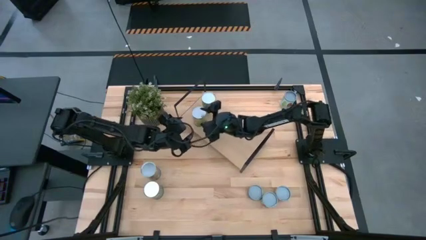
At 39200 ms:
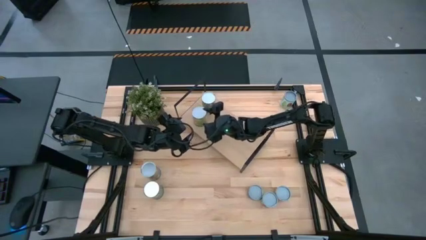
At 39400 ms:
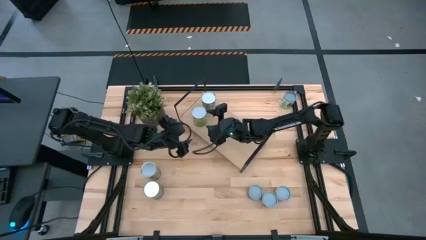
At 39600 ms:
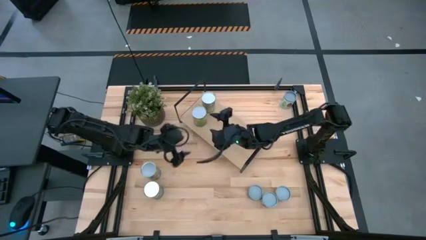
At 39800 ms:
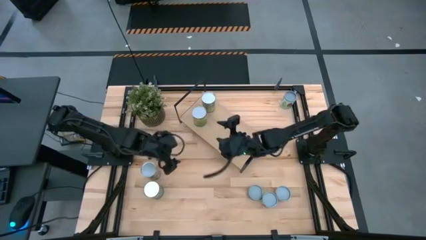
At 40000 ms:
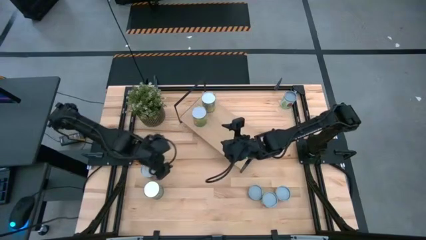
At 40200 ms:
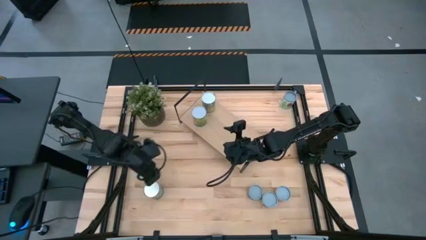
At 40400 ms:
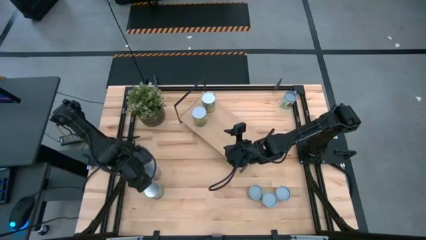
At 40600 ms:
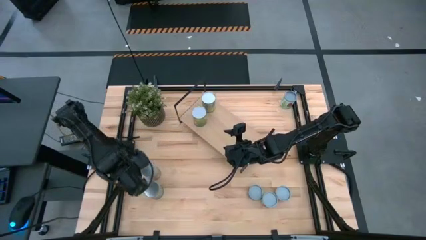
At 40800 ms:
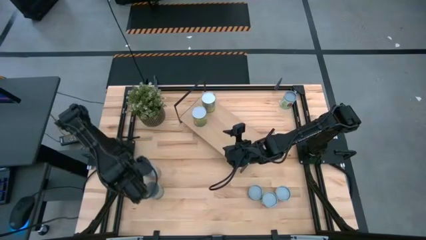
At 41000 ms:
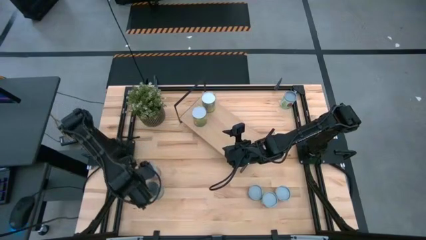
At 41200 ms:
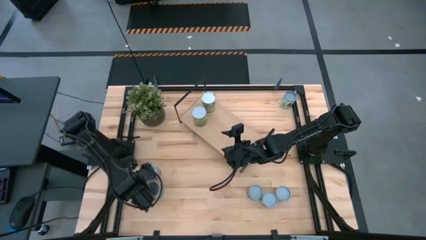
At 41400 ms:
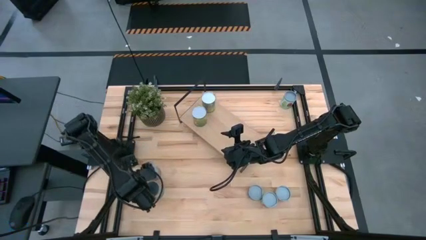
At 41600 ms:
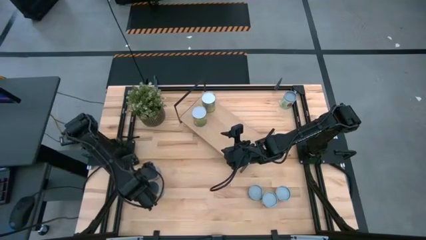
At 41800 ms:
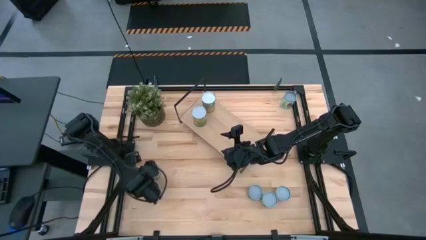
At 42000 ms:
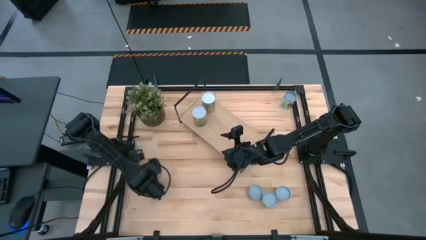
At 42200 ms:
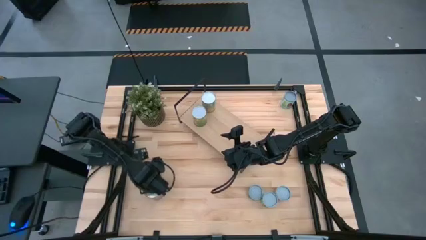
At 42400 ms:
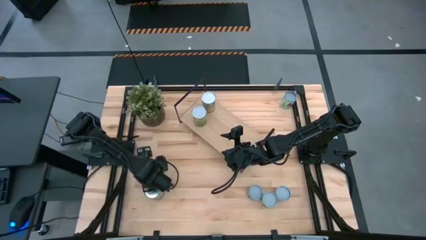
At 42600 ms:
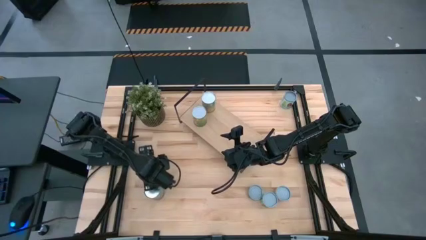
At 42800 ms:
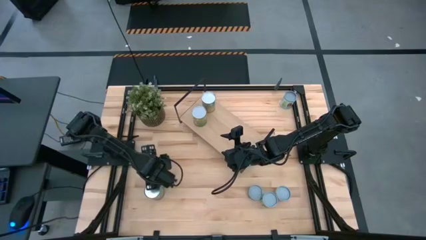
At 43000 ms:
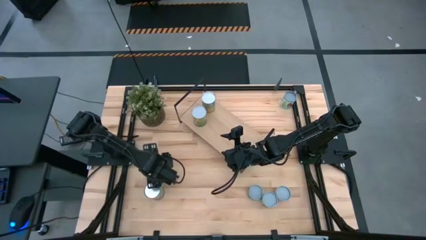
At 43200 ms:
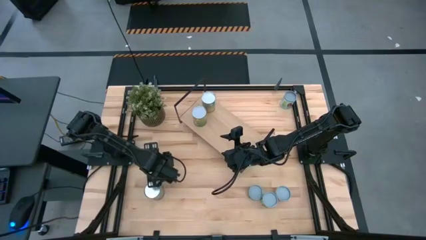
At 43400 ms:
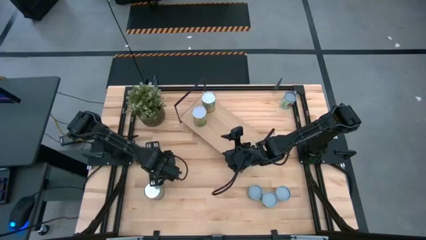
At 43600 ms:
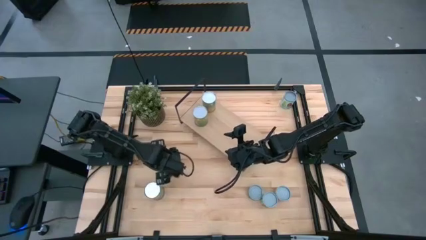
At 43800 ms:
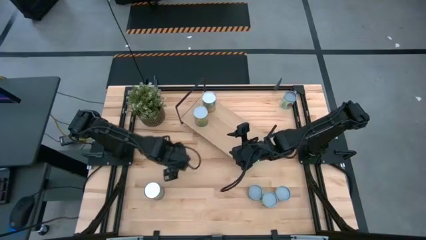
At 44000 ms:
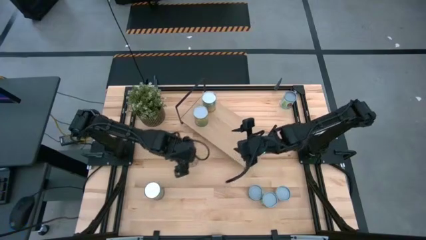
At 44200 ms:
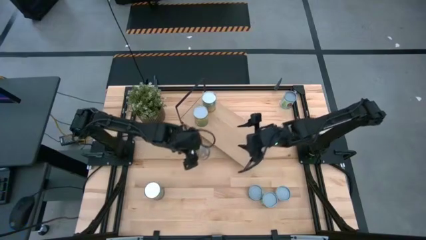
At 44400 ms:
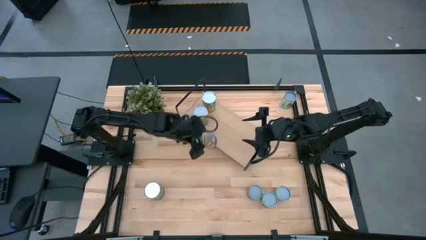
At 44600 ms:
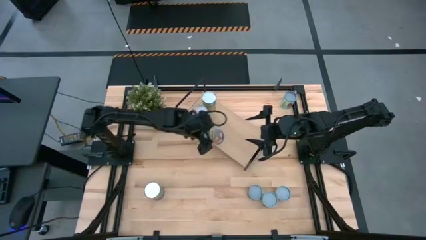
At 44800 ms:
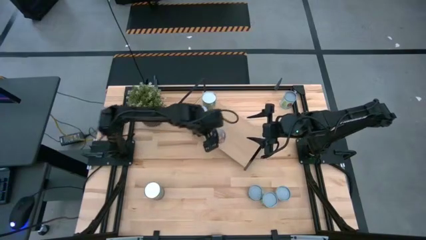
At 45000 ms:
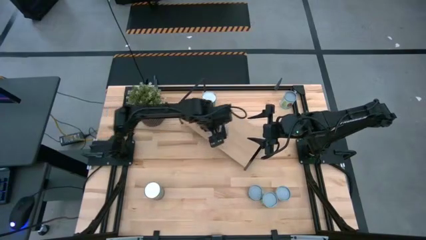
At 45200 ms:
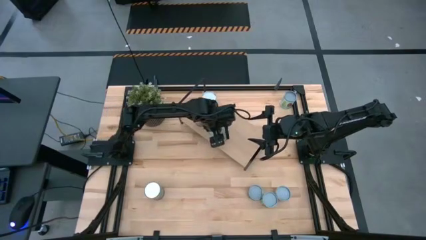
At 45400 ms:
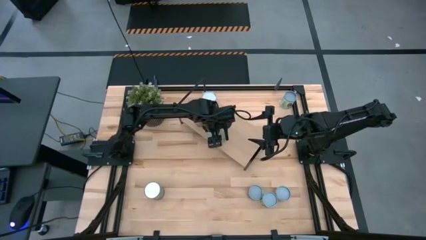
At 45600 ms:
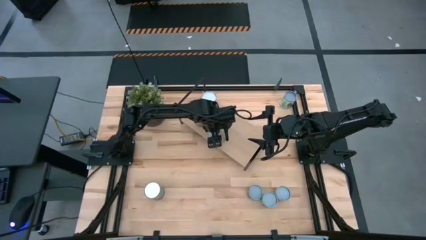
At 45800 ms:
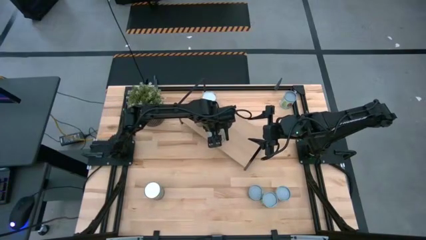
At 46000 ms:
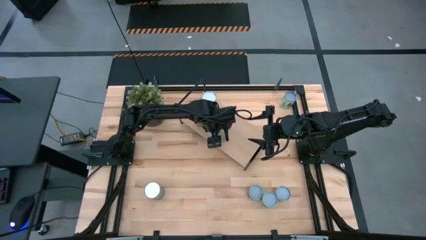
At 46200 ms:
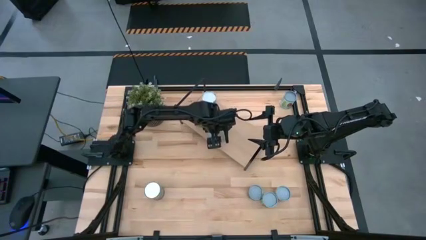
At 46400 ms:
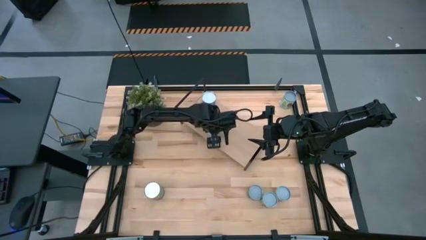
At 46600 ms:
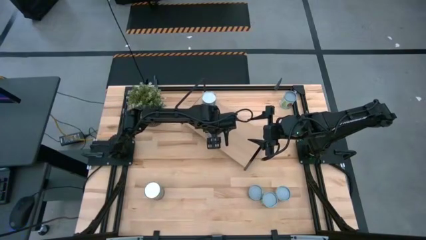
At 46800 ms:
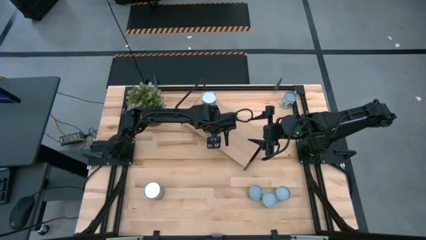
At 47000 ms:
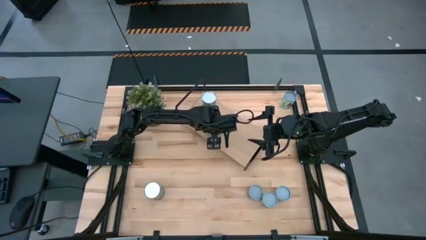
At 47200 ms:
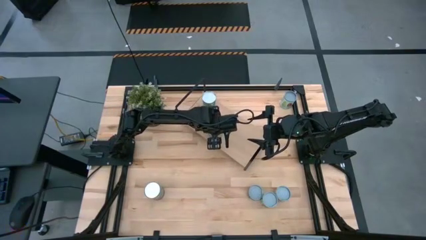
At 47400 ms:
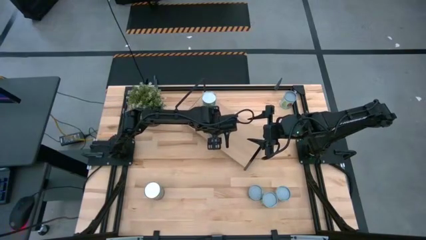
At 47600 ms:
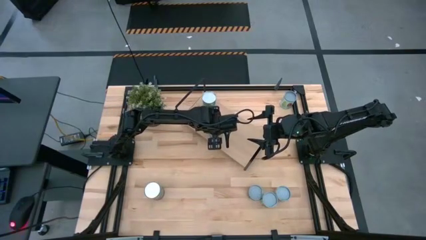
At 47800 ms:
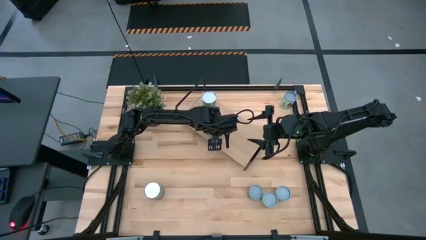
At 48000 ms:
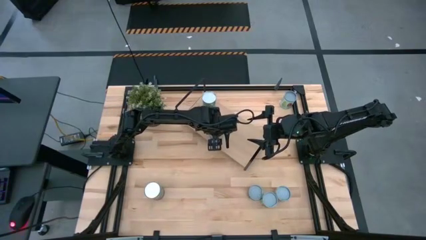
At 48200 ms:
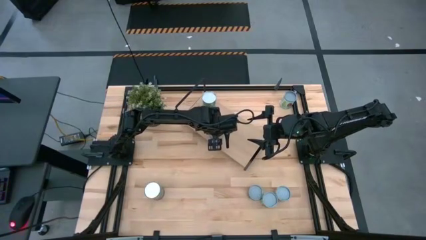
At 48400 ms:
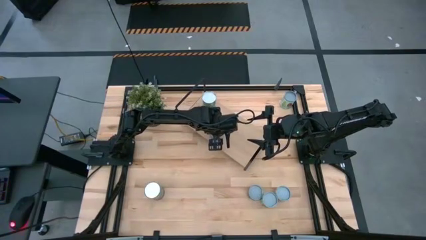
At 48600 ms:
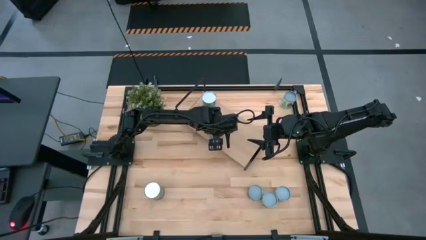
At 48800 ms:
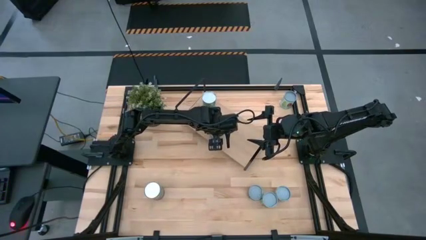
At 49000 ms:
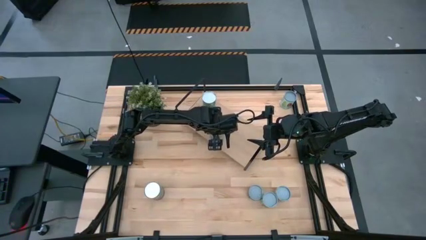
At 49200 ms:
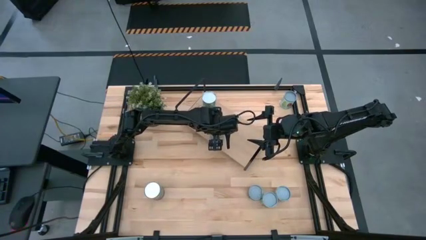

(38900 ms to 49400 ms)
Task: Pick and place cans onto a shelf
Put the canned peaches on the shelf

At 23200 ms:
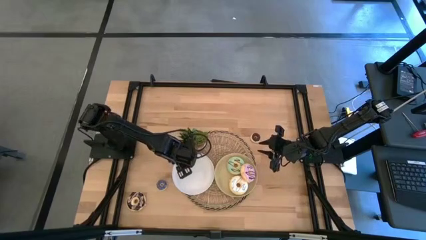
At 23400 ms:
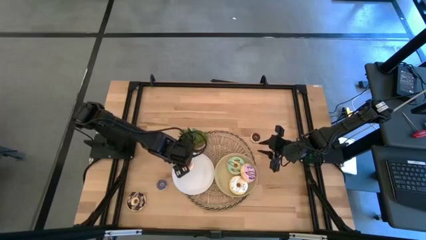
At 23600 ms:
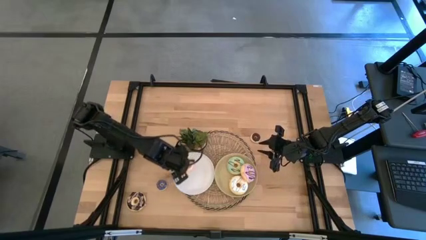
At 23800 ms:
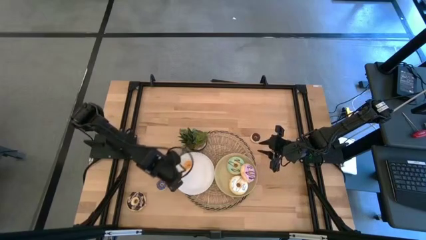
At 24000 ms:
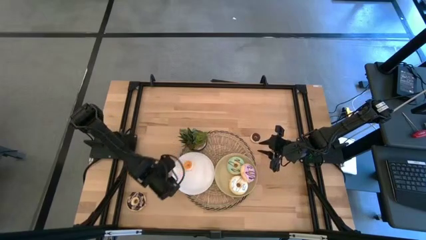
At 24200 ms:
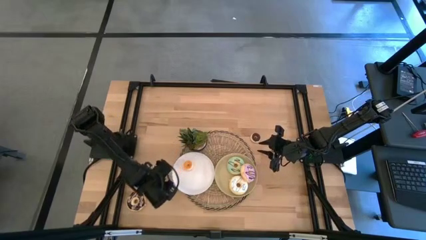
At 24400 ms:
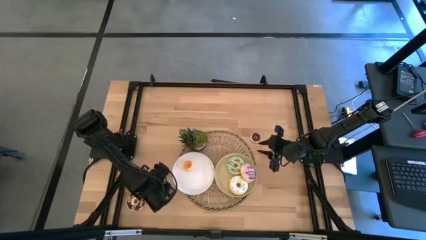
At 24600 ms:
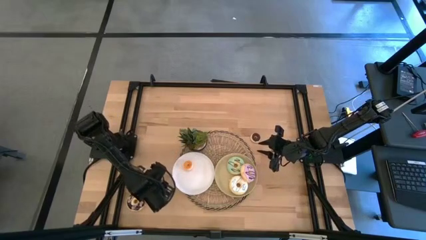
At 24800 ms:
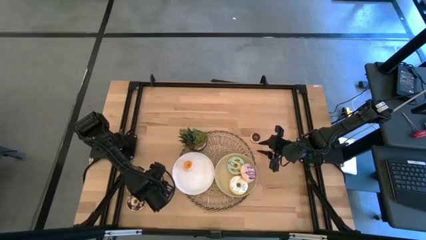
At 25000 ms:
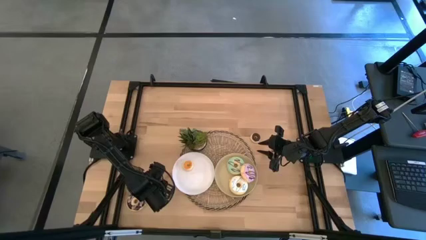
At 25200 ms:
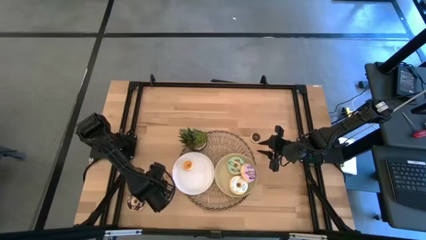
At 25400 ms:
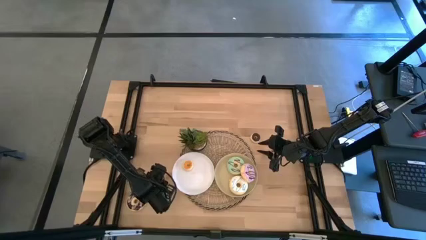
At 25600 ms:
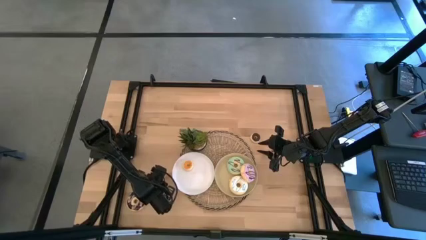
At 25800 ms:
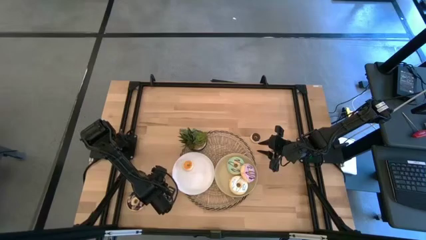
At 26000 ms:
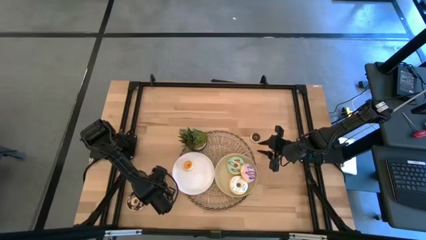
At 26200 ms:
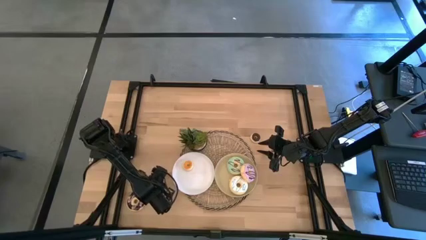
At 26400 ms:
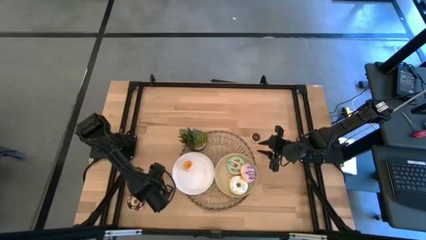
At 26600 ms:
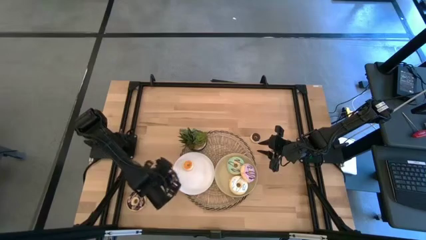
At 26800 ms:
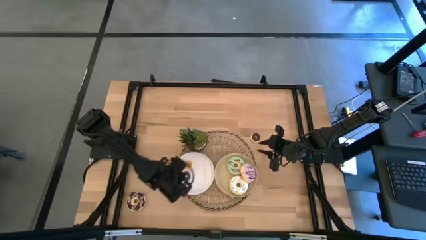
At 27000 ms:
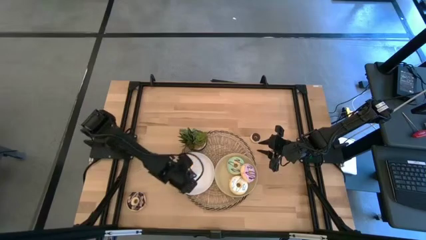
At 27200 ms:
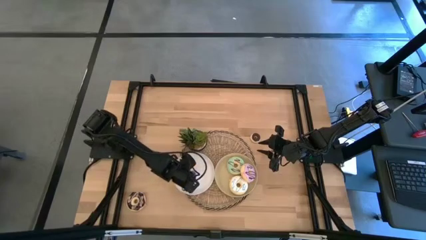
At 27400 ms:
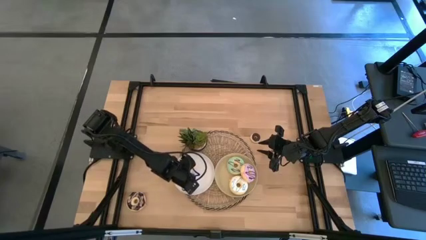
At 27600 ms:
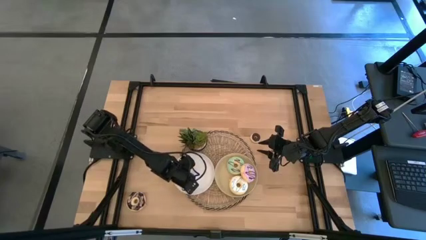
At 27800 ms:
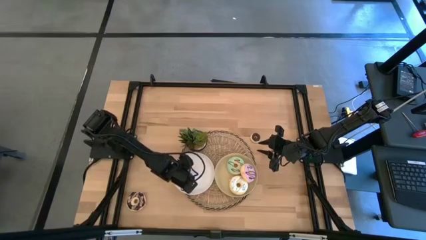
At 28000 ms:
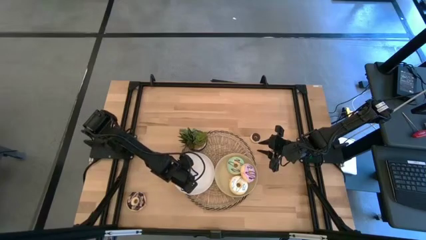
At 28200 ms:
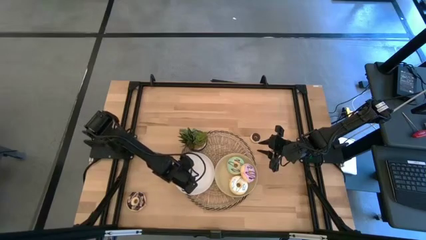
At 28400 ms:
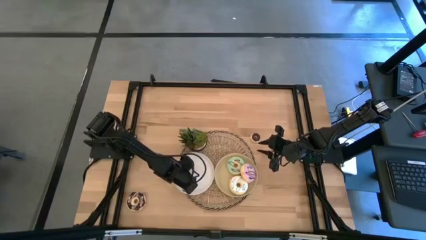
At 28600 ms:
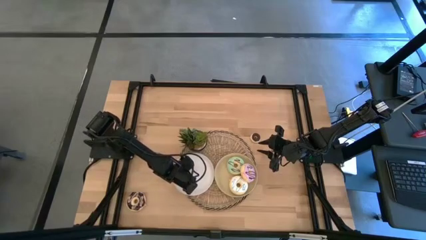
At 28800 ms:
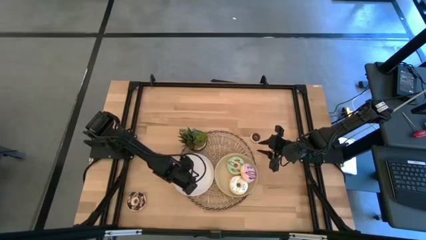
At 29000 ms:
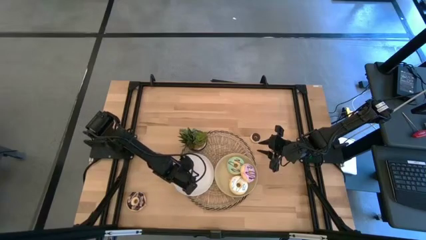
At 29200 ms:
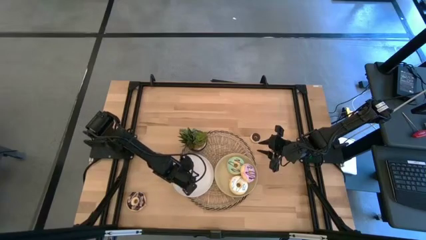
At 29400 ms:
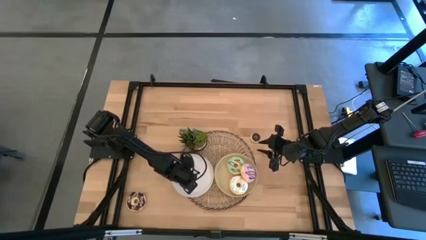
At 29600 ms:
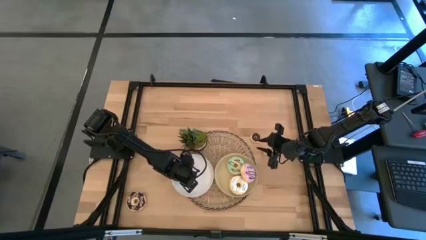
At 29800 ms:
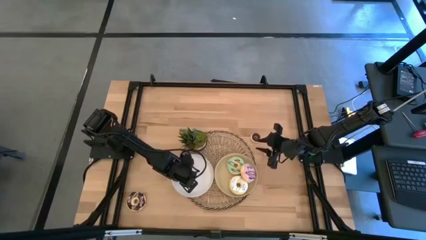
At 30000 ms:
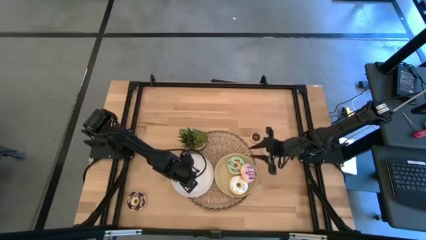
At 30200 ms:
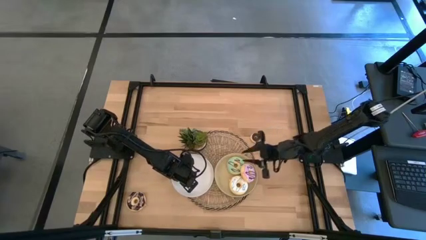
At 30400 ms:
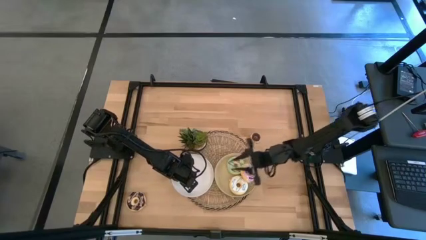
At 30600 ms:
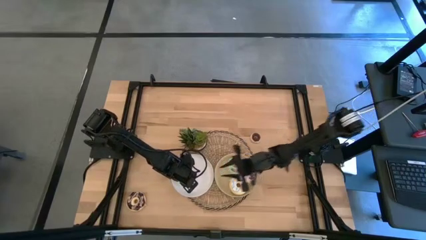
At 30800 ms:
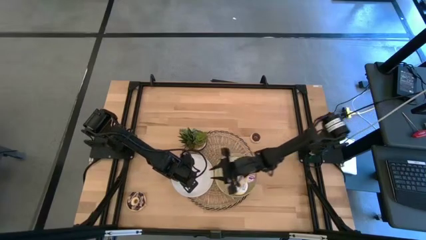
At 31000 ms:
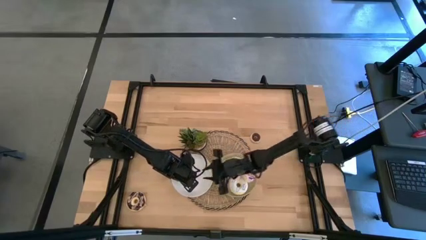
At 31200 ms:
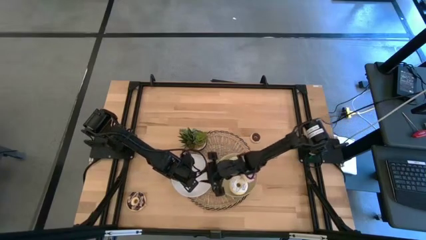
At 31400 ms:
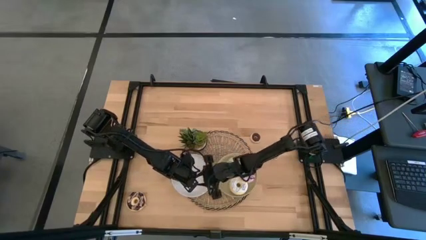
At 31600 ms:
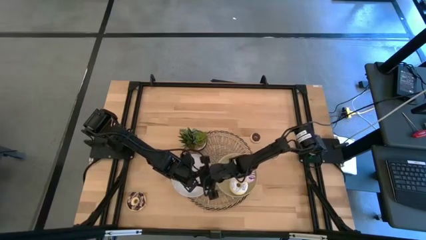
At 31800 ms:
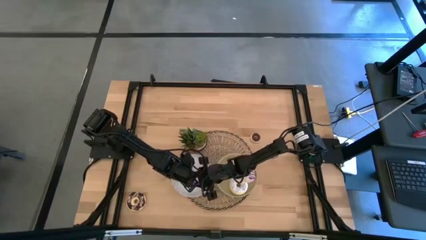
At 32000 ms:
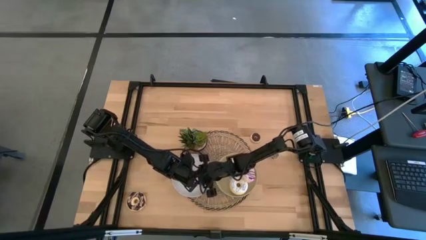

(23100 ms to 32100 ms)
Task: Pick & Place donuts
Put the small purple donut on the white plate
